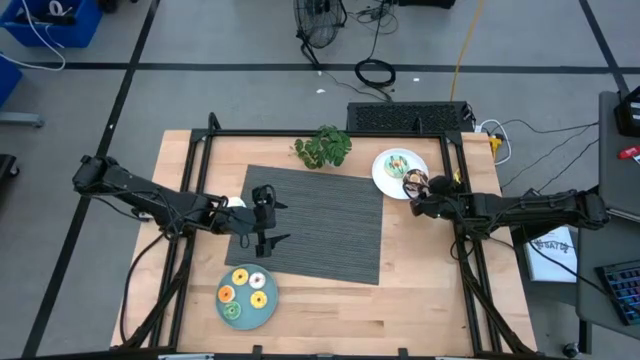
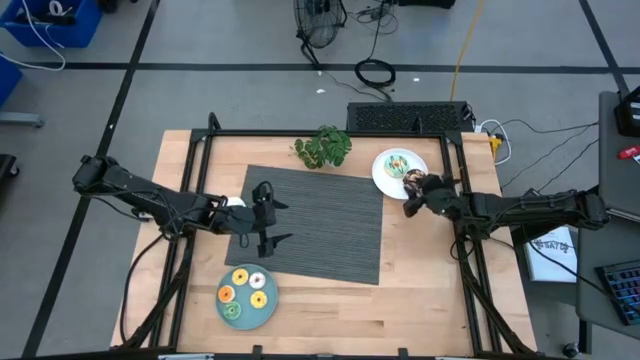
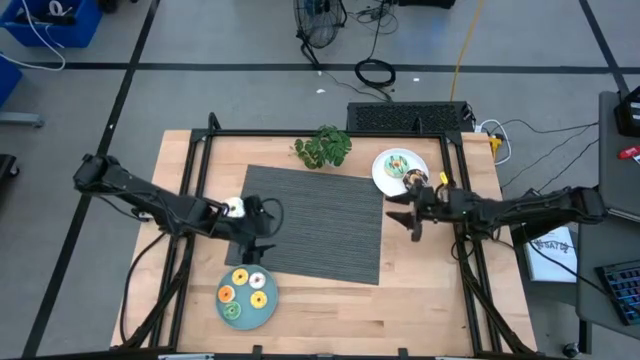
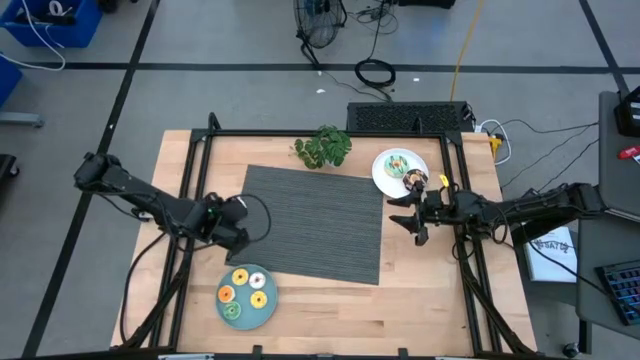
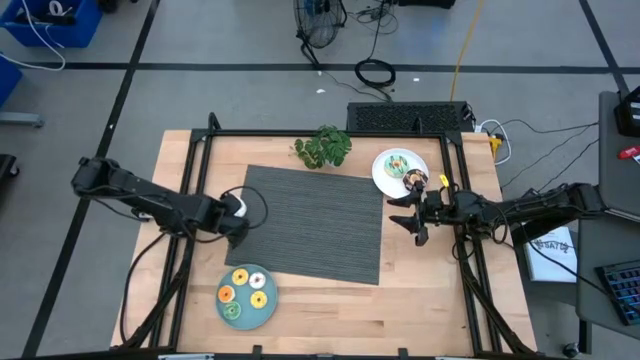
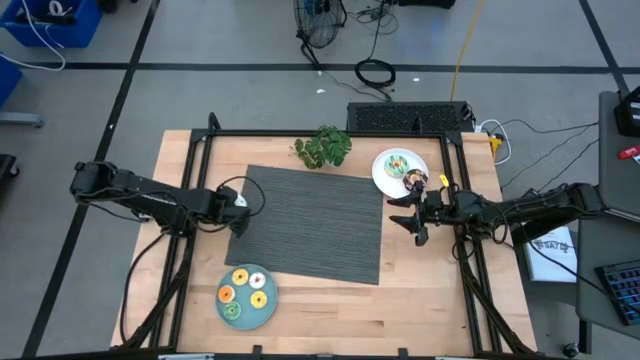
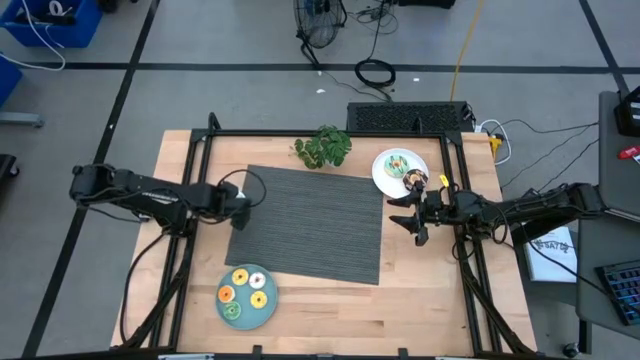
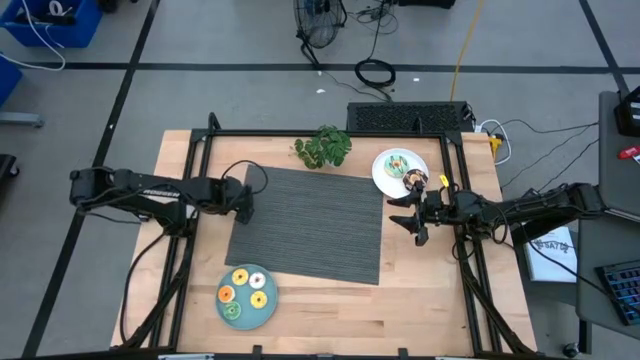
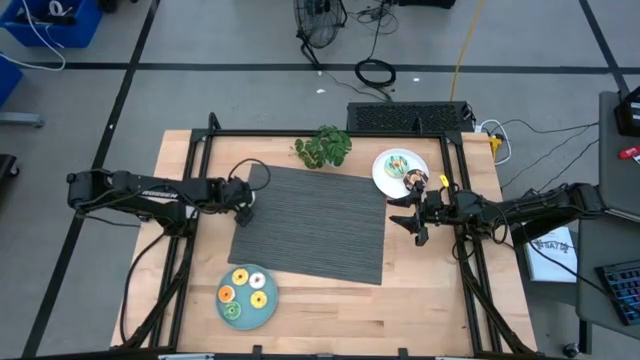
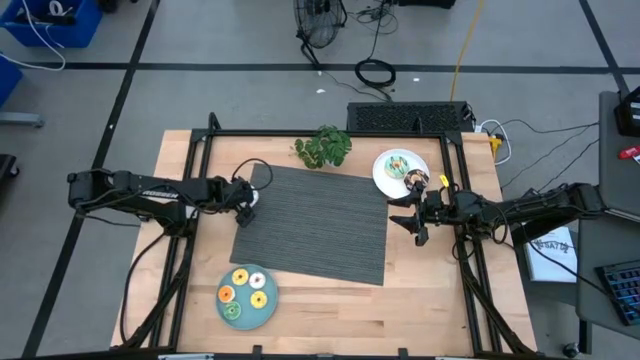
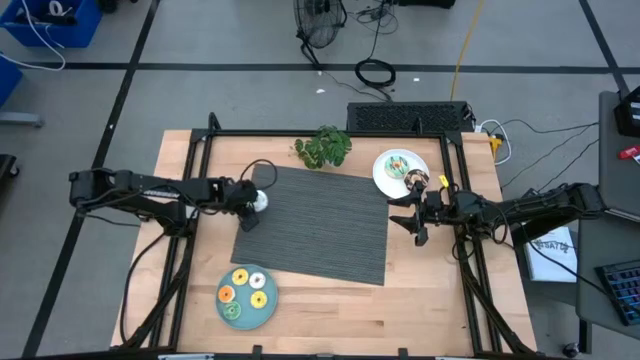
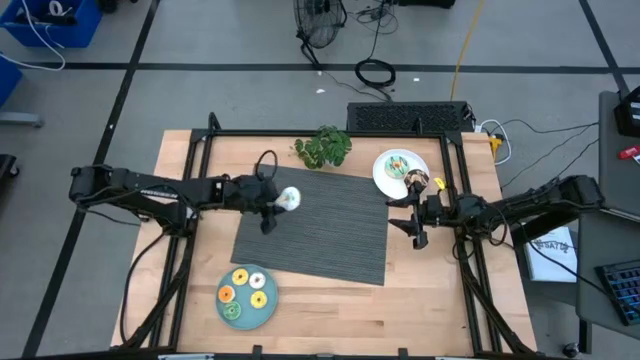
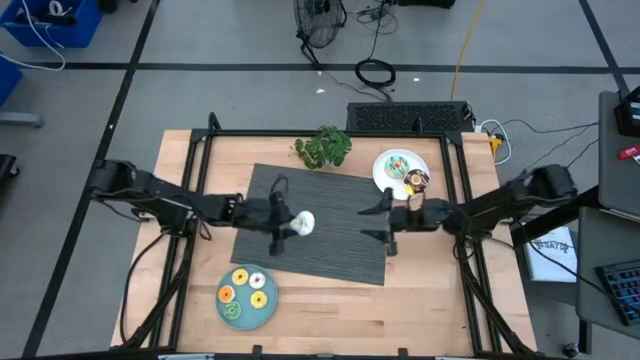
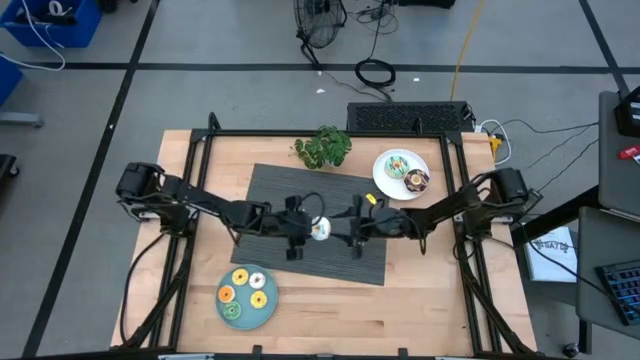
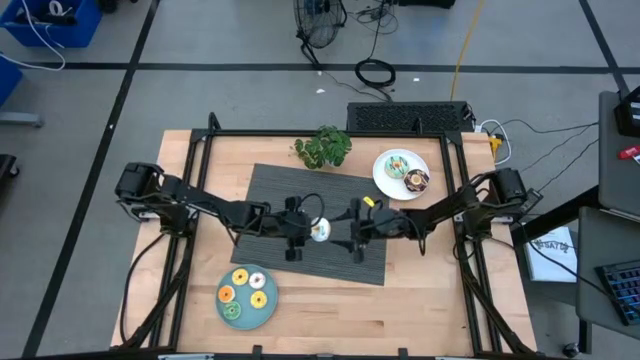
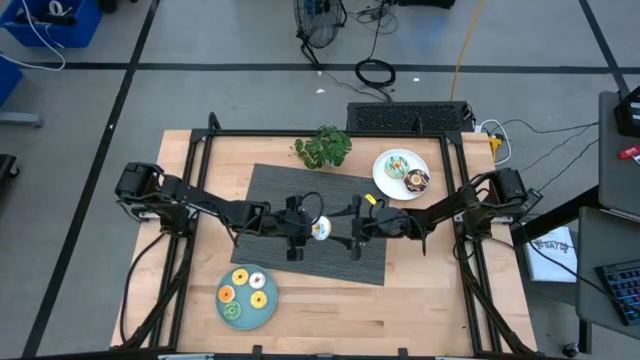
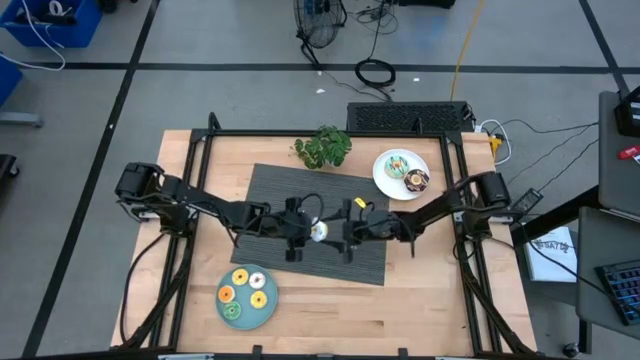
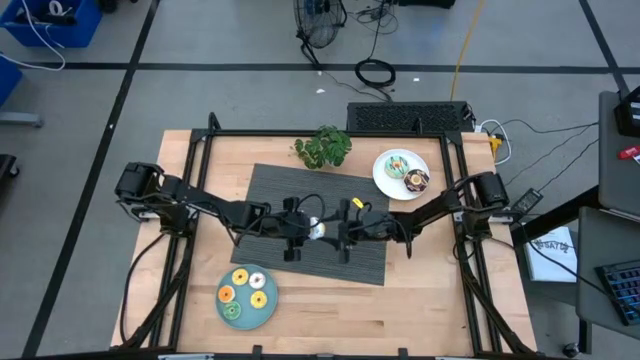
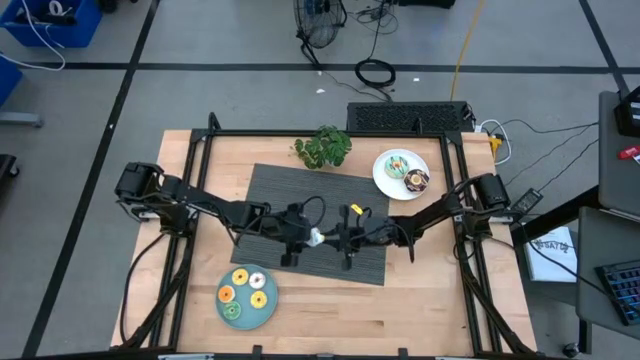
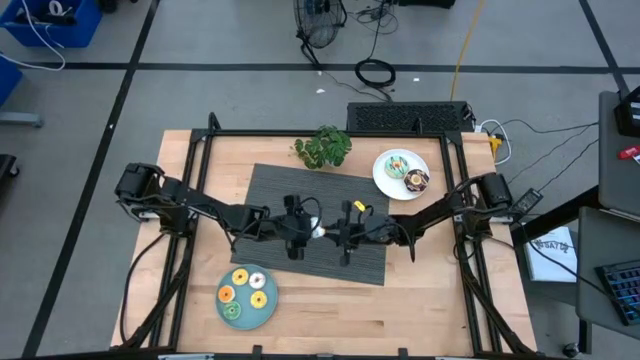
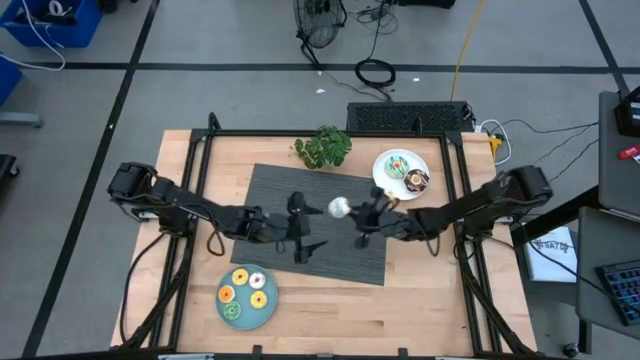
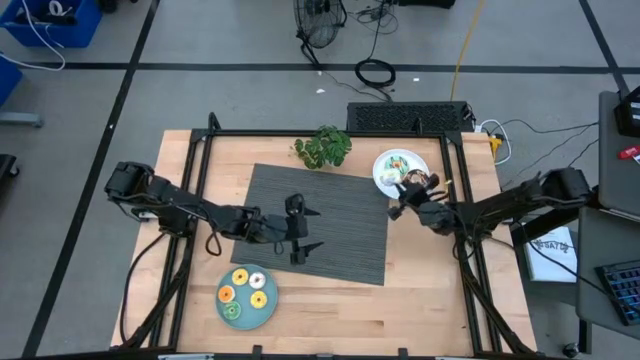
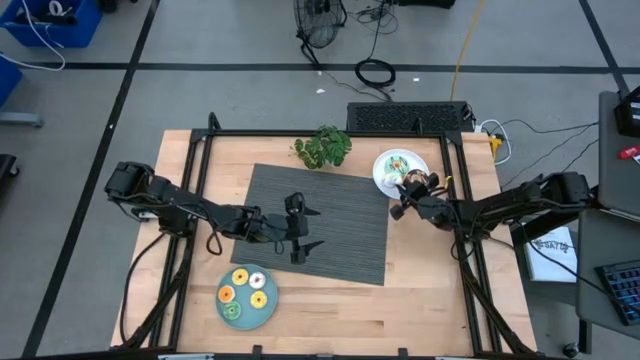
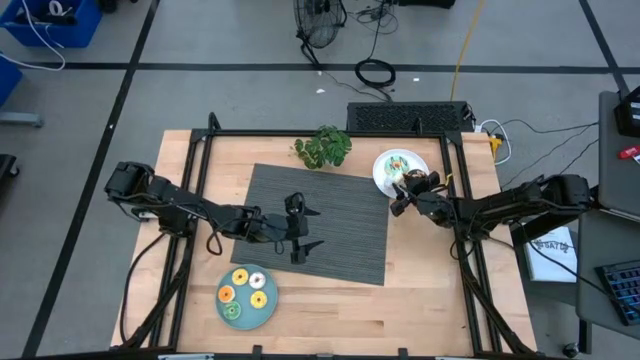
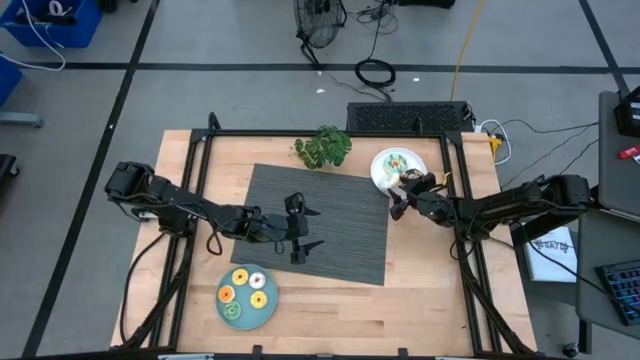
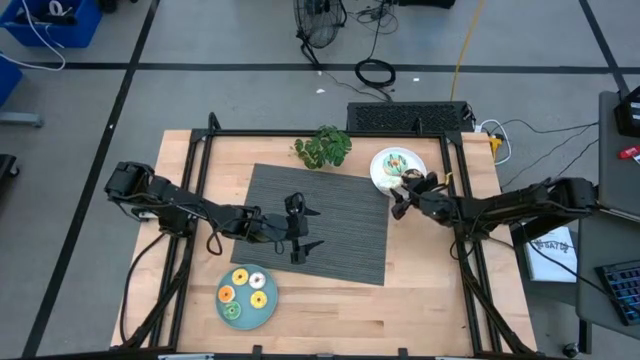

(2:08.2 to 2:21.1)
Task: Pick & Place donuts
Put the large light blue donut on the white plate

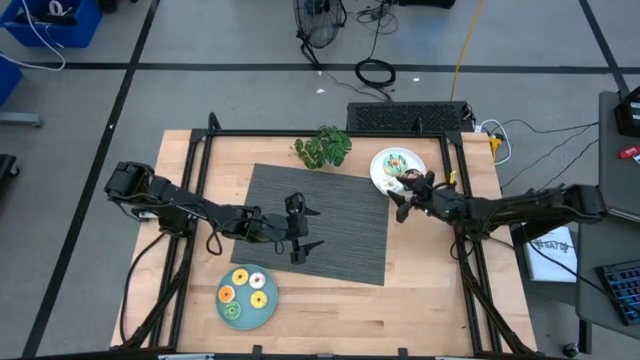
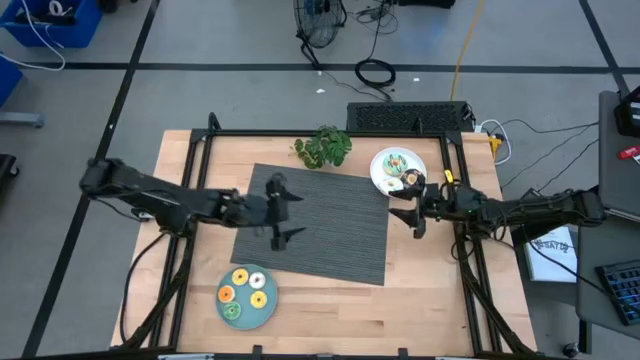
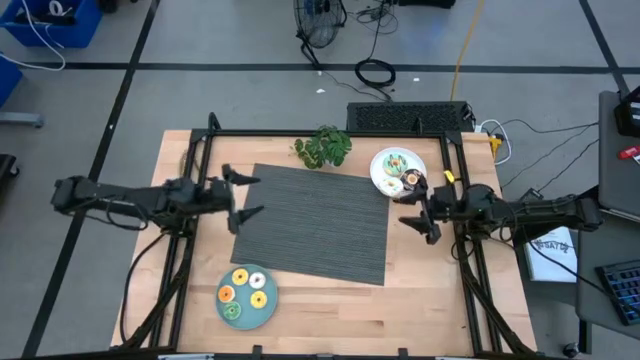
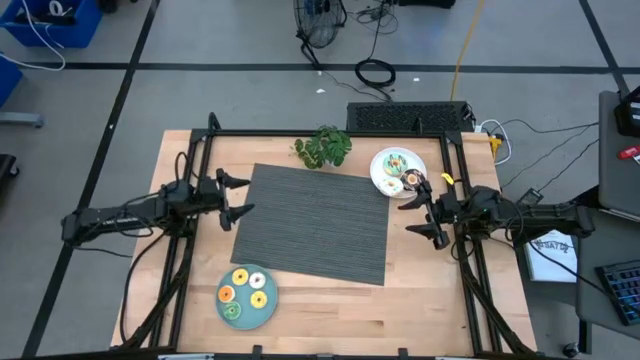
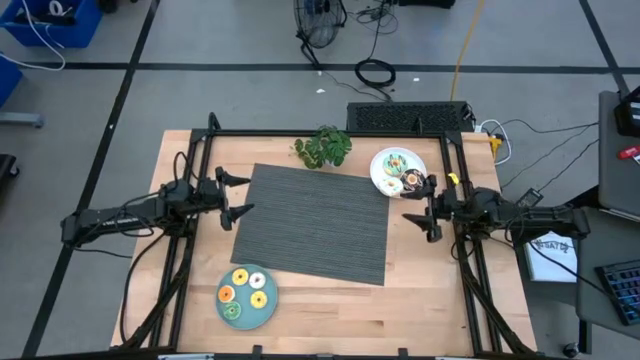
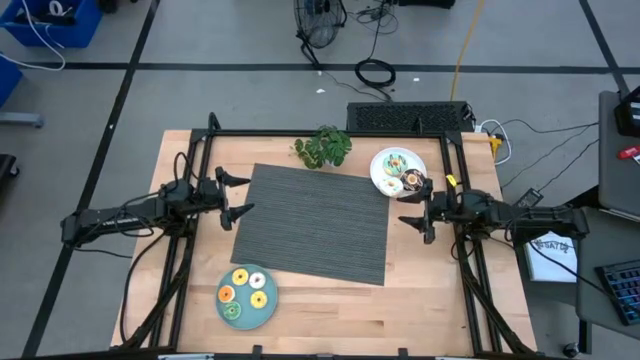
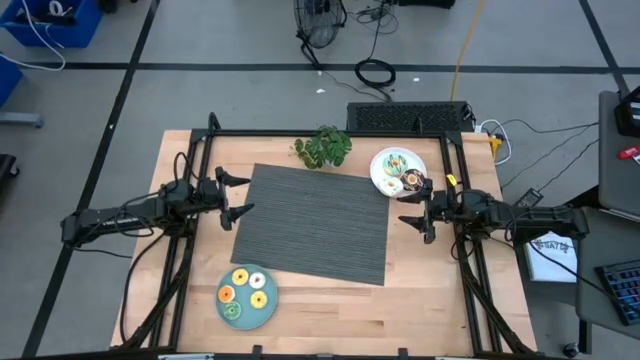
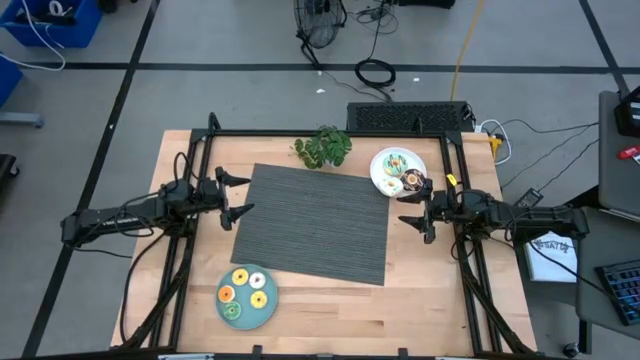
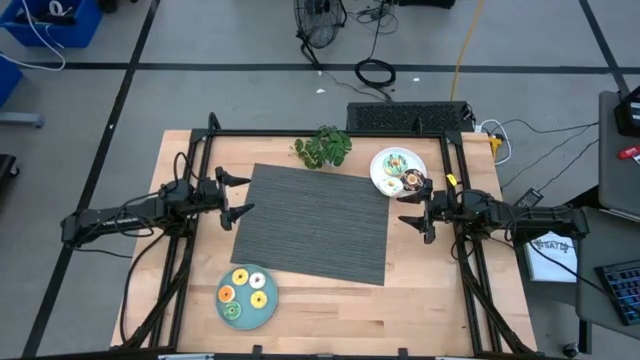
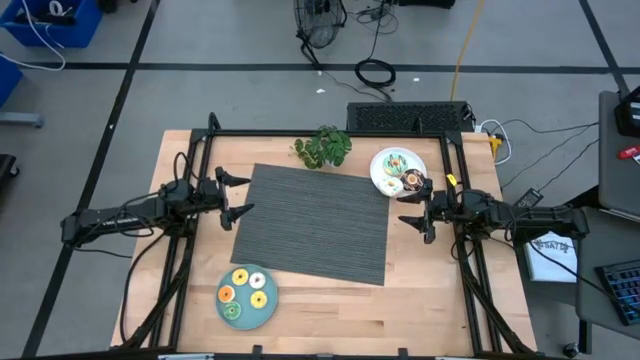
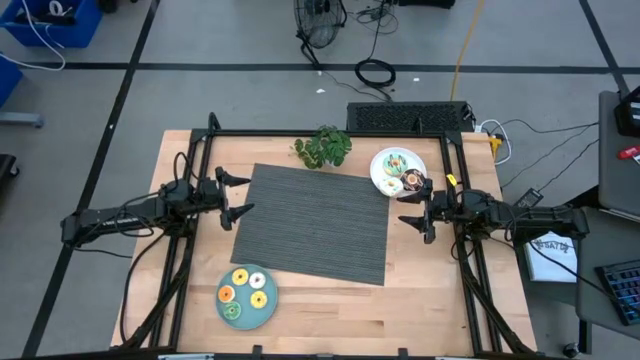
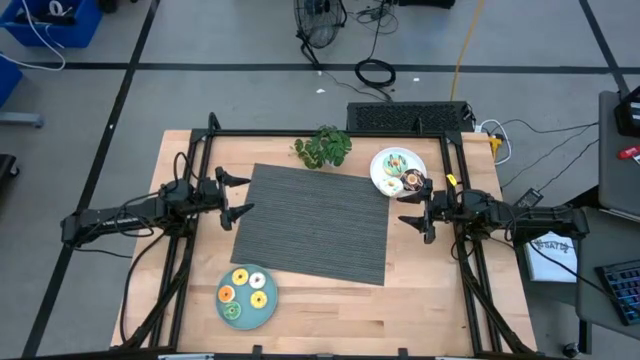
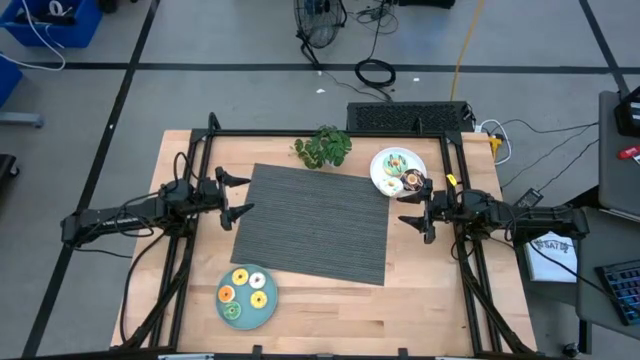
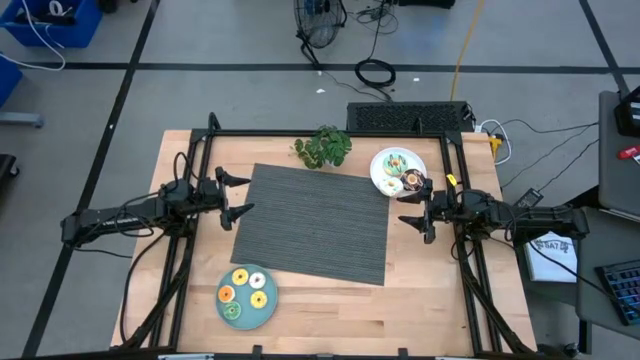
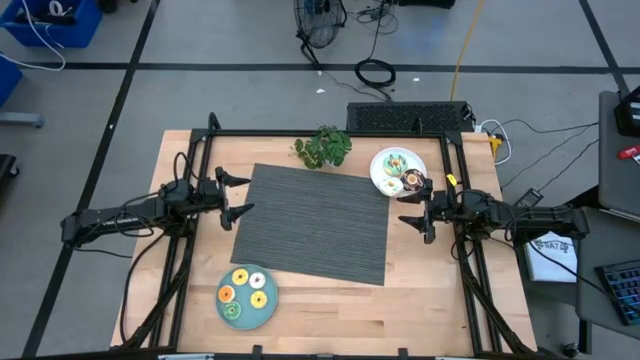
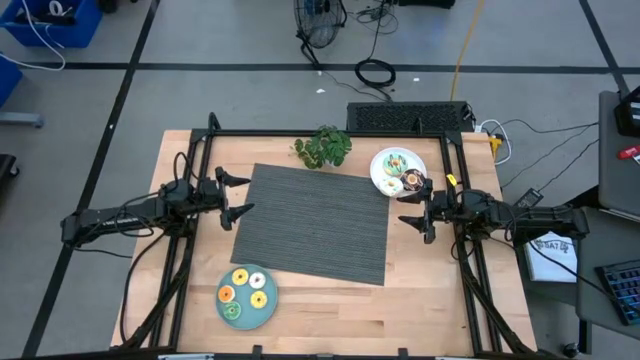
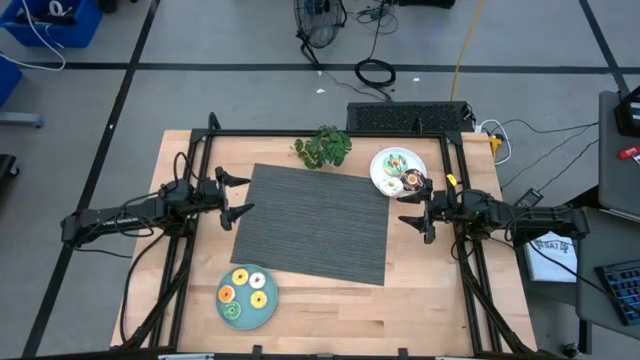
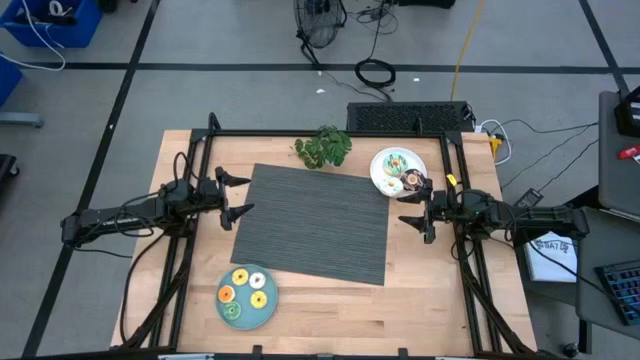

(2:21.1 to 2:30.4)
Return to Home Position
